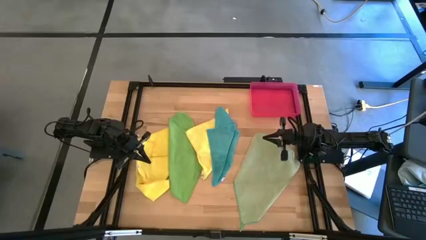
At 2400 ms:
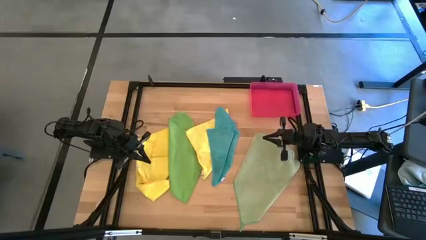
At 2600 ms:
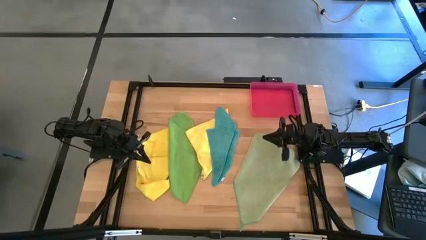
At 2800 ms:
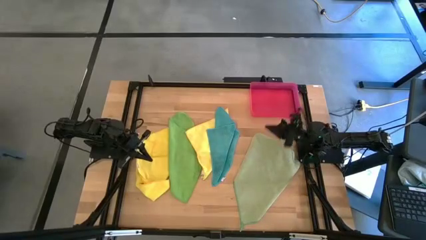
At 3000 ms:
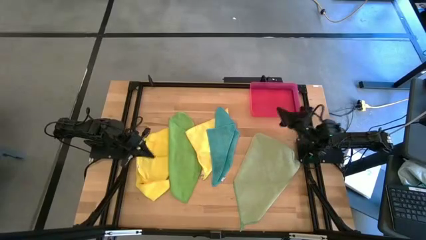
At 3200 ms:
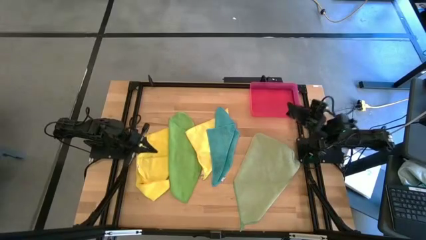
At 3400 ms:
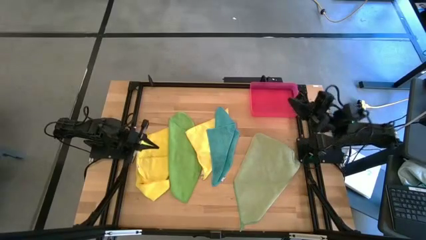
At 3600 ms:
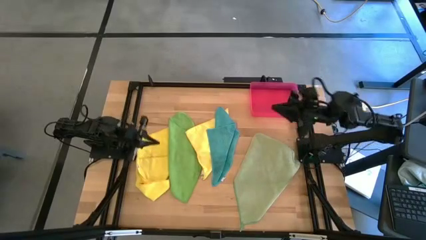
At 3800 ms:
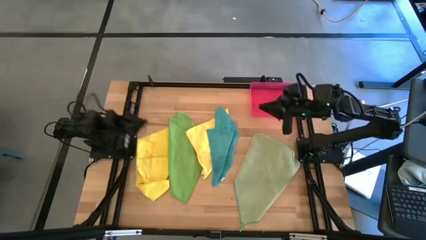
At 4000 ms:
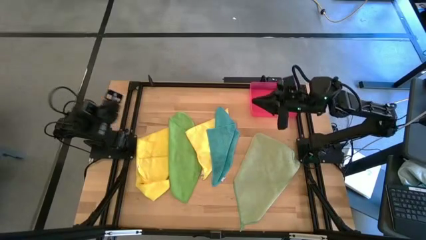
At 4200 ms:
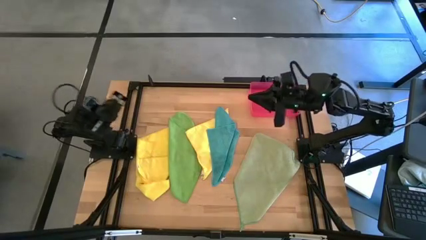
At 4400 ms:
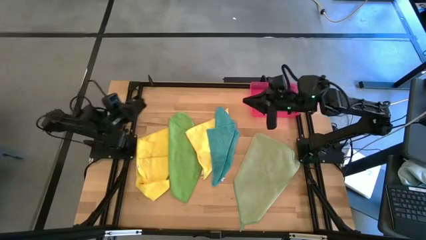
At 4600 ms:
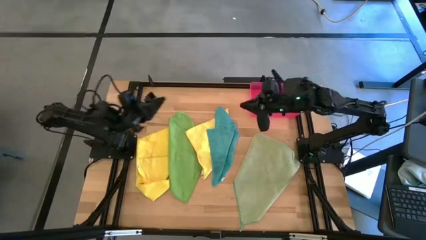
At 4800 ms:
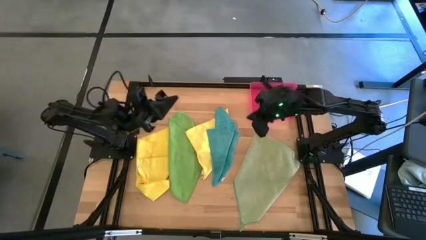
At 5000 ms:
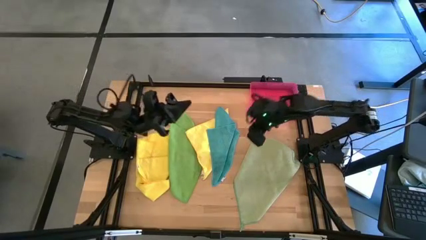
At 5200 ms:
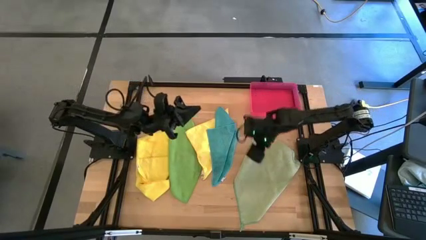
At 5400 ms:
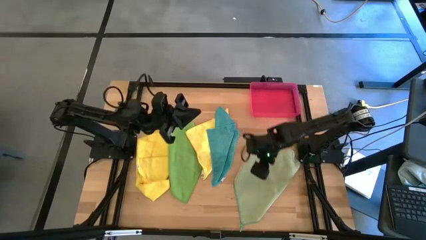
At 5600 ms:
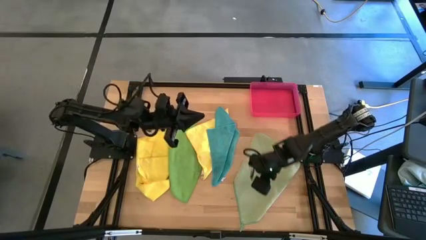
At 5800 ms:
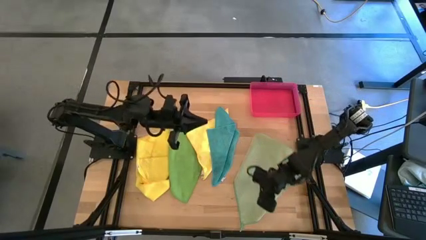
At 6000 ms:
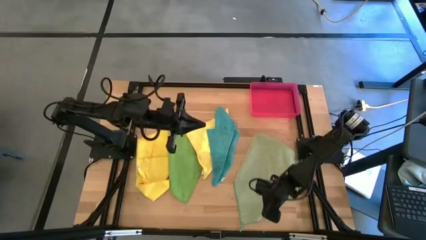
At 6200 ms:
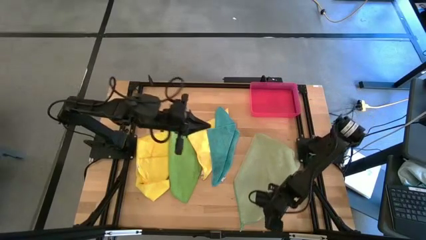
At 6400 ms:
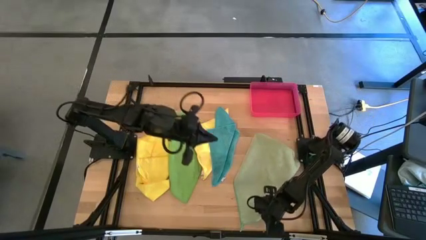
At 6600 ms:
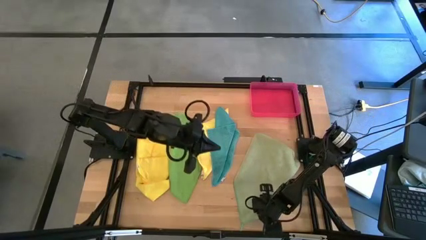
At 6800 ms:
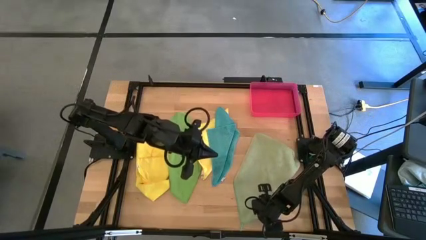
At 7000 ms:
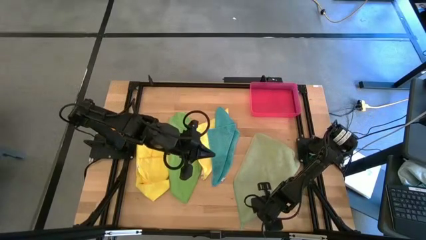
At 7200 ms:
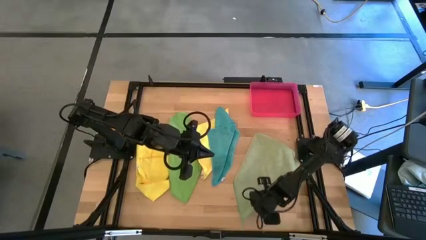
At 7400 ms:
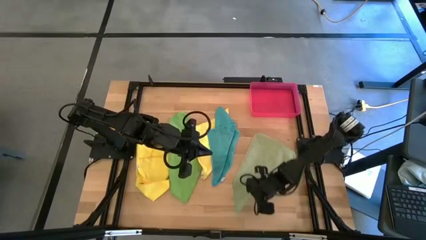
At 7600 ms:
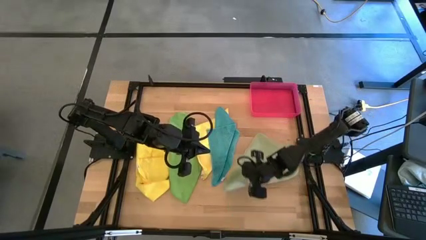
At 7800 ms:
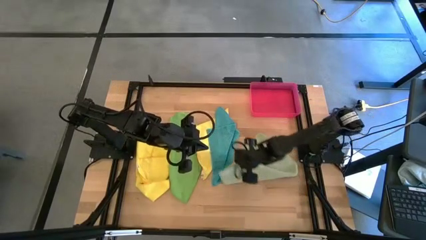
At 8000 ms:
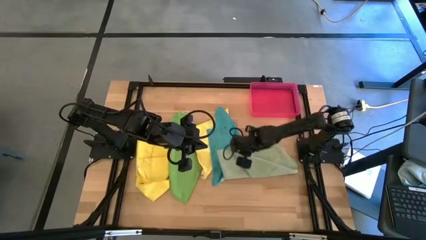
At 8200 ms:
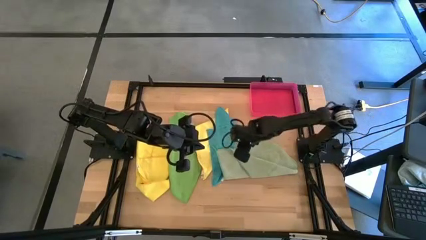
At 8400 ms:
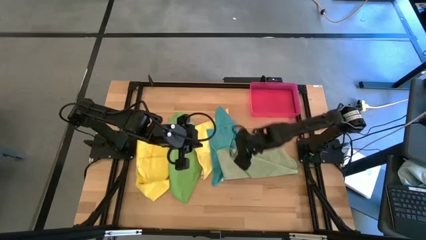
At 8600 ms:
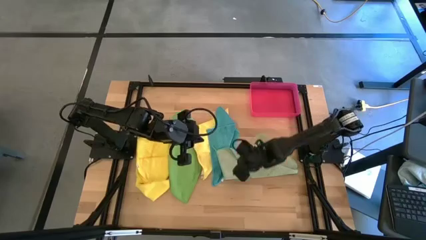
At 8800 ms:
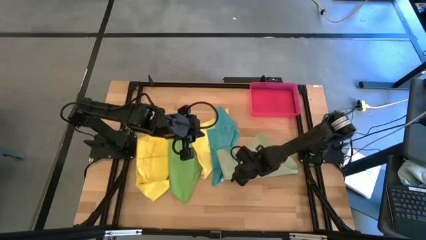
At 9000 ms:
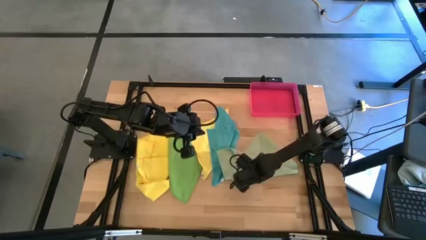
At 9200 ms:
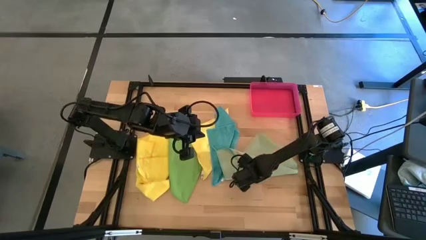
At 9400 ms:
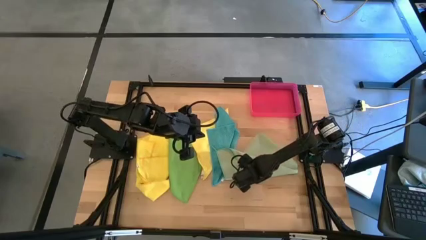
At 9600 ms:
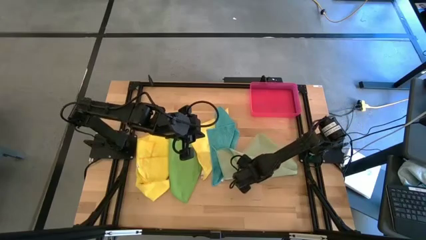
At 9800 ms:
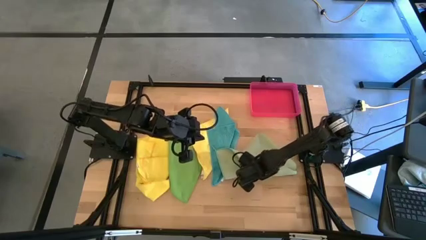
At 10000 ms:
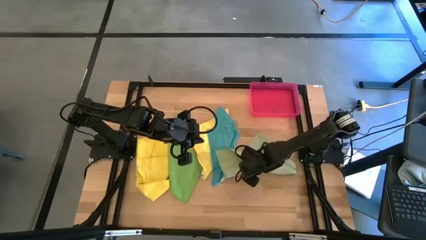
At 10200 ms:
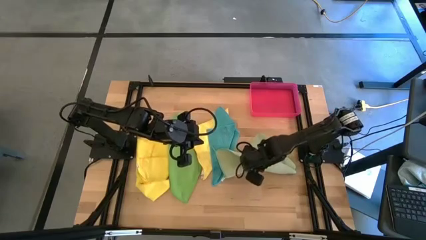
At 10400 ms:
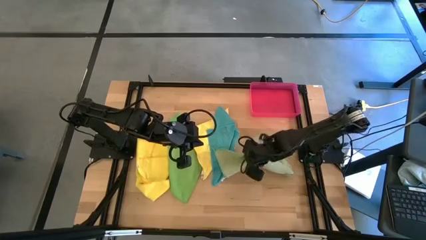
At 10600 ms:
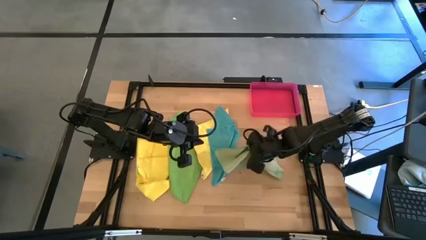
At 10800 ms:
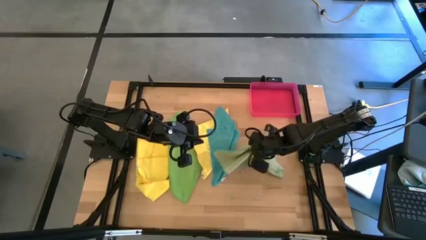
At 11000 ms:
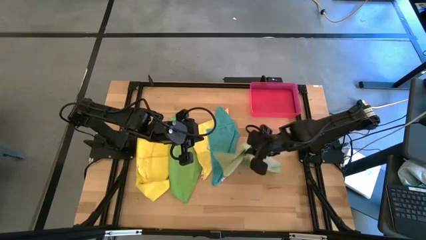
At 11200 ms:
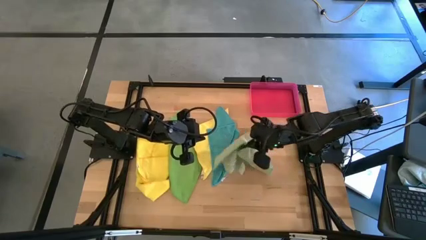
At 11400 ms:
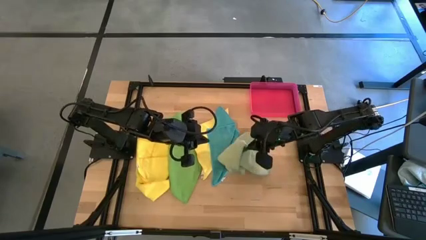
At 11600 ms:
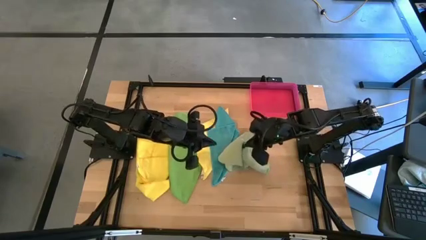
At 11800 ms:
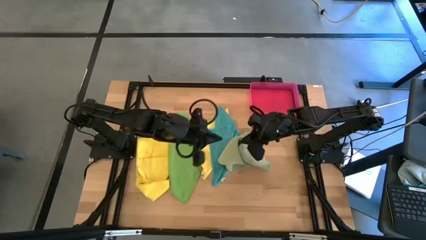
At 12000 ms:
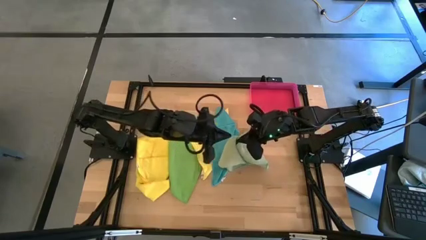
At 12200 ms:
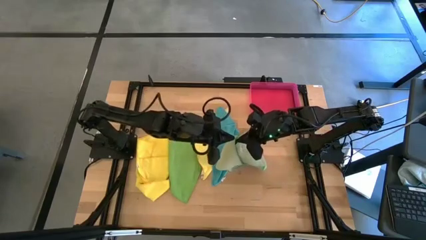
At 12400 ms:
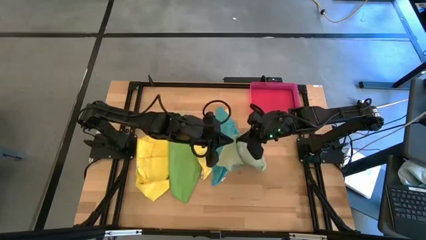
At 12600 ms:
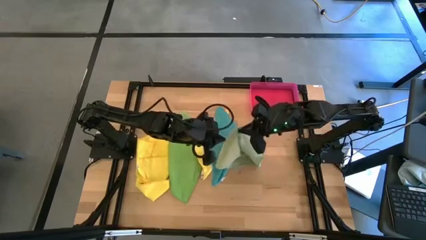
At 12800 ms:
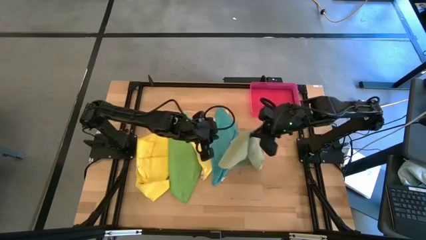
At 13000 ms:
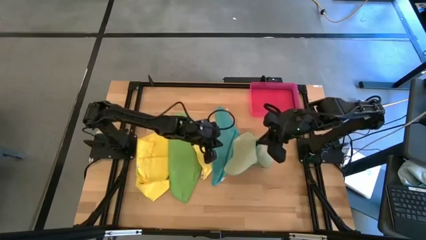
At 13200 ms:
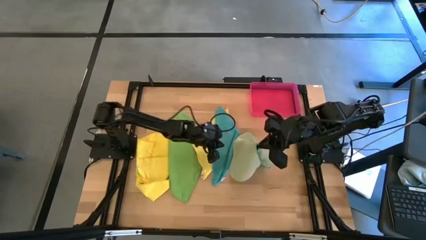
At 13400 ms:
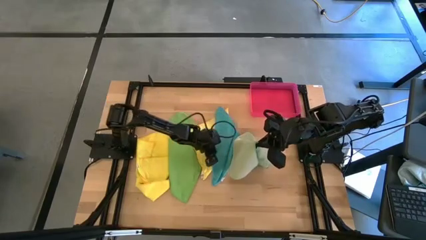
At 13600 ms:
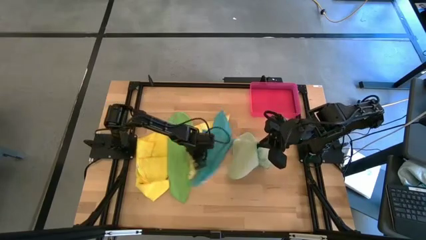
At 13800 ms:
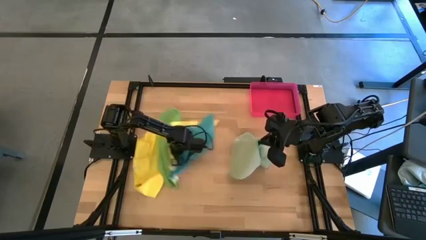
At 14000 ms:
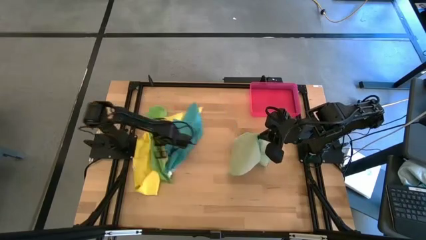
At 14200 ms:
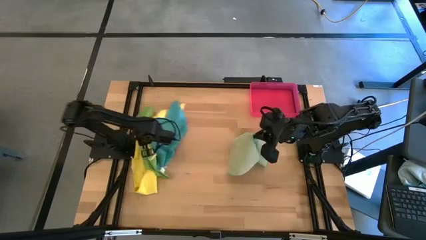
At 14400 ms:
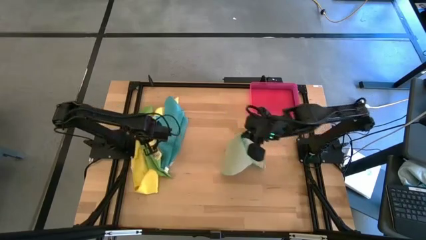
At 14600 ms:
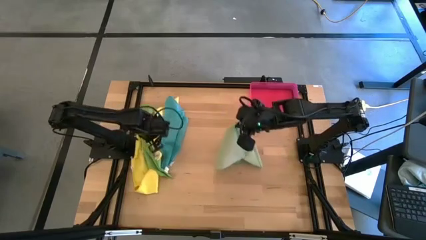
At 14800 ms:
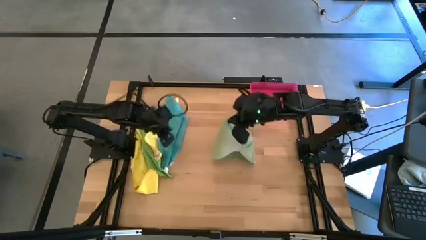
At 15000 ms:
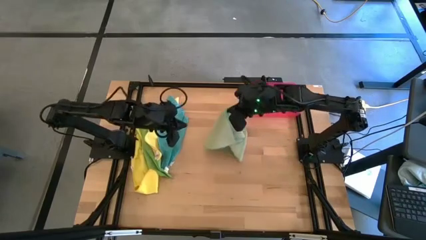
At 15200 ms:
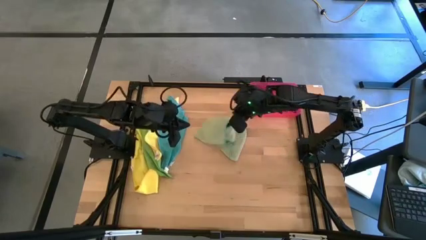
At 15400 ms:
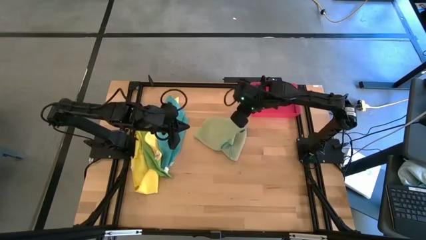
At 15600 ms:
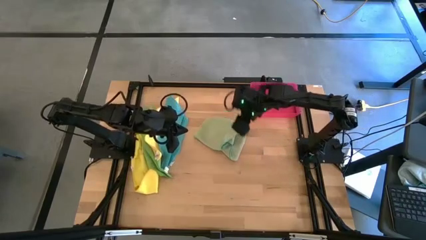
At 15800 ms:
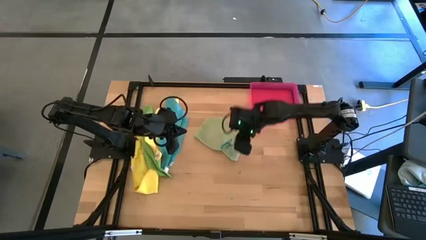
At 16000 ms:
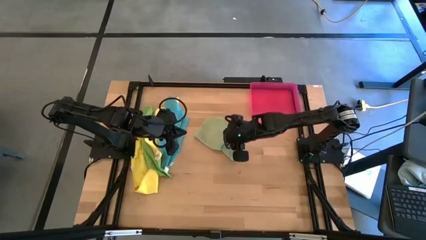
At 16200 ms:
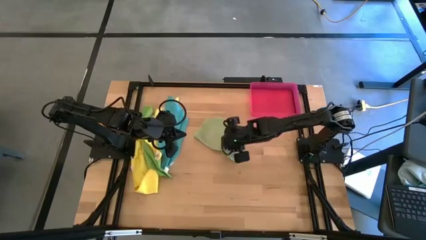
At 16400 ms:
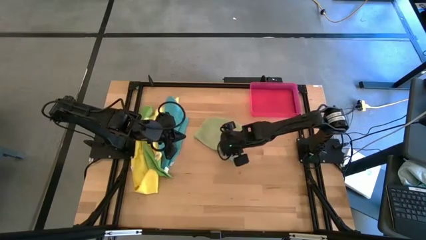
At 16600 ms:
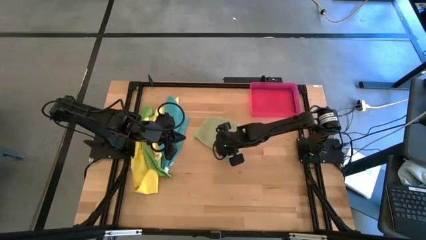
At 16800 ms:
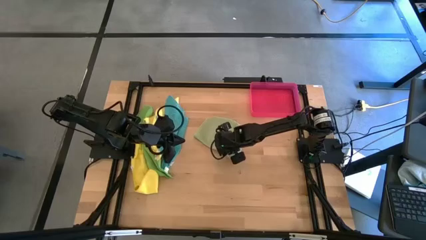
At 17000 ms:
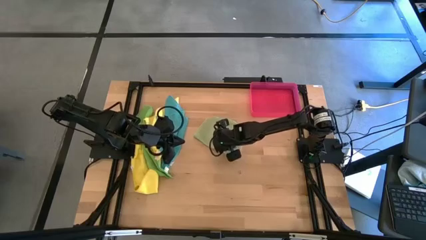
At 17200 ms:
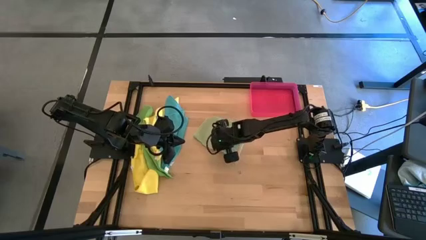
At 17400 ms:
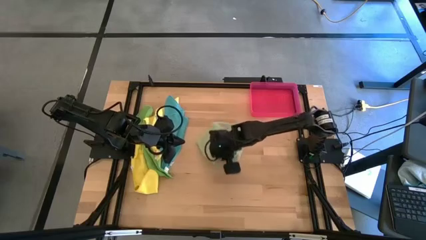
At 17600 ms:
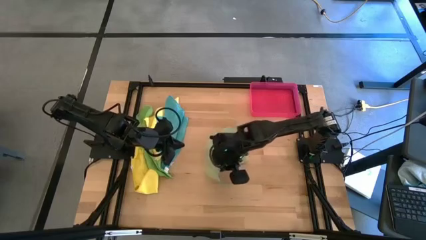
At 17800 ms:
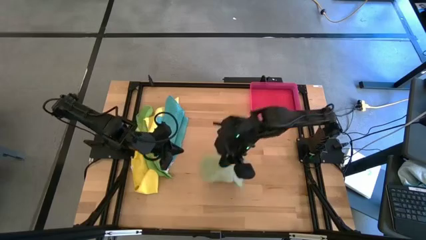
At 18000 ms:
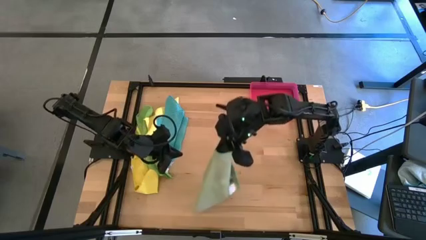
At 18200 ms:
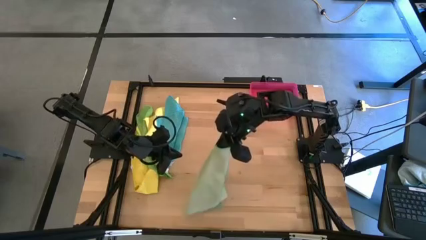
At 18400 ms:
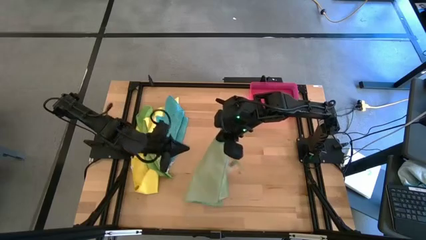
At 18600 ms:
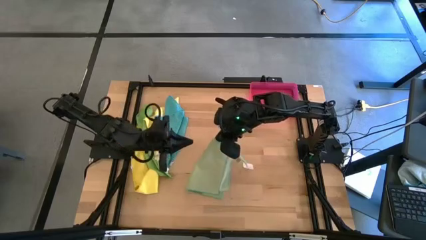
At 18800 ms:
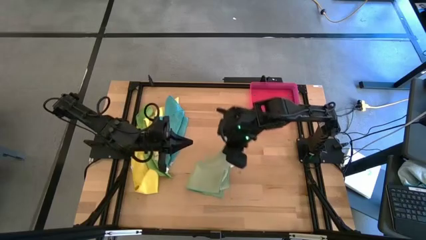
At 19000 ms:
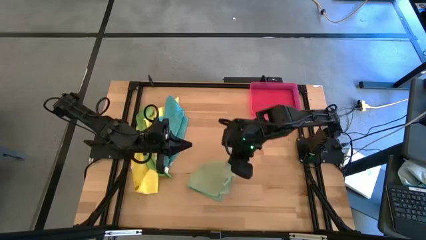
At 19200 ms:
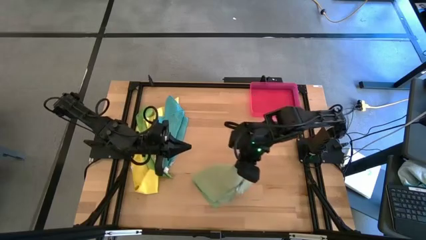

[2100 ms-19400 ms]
Task: Fold microfiber towels
Fold the light green towel
